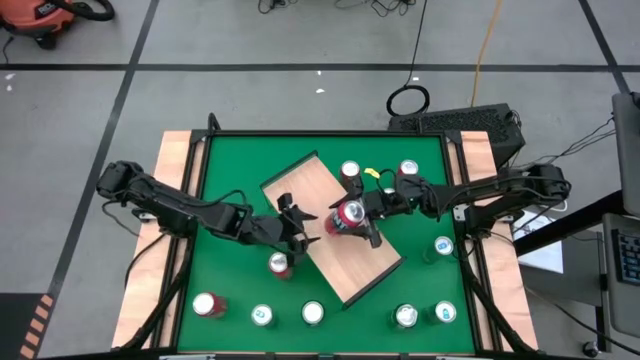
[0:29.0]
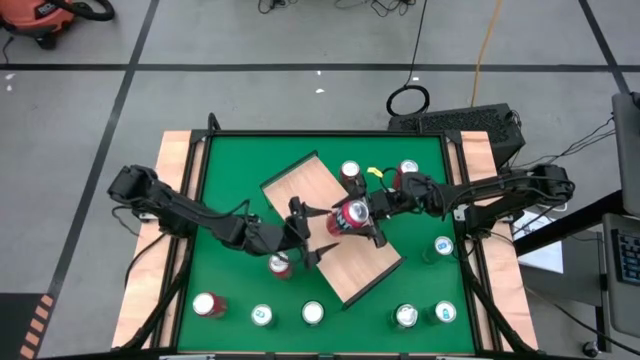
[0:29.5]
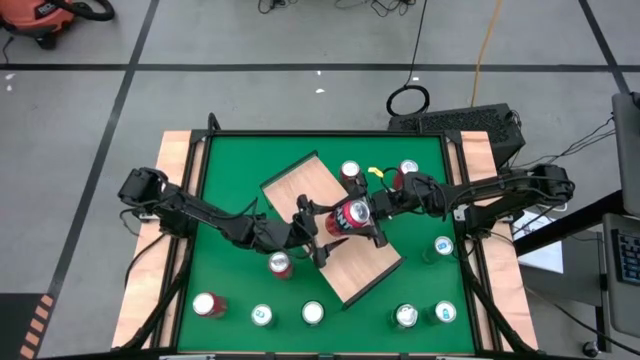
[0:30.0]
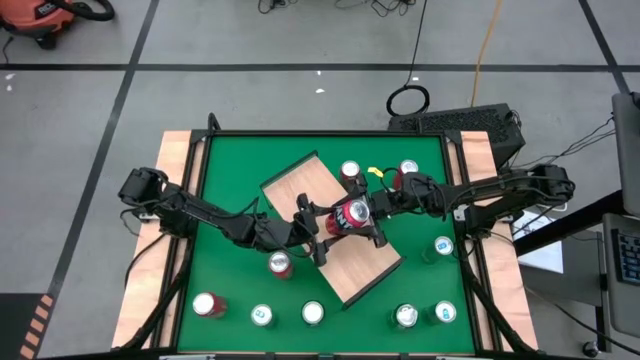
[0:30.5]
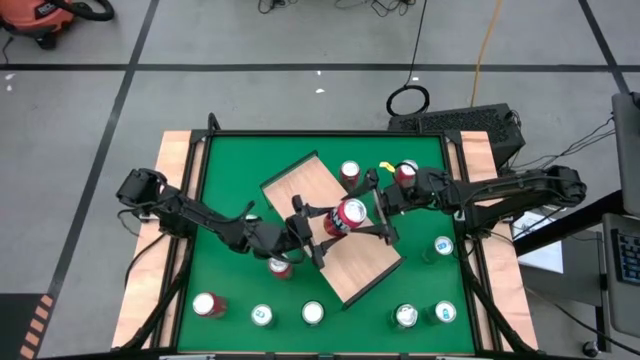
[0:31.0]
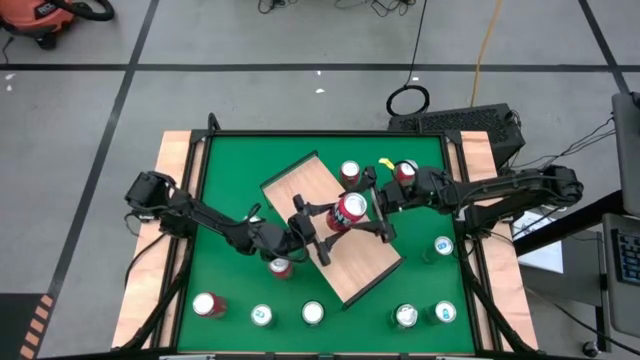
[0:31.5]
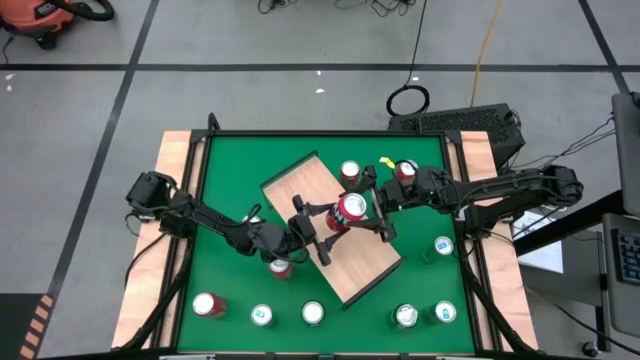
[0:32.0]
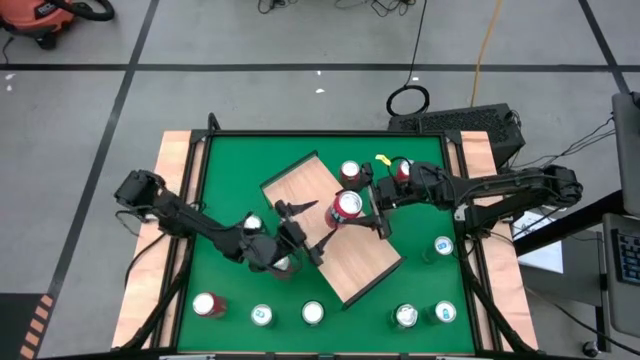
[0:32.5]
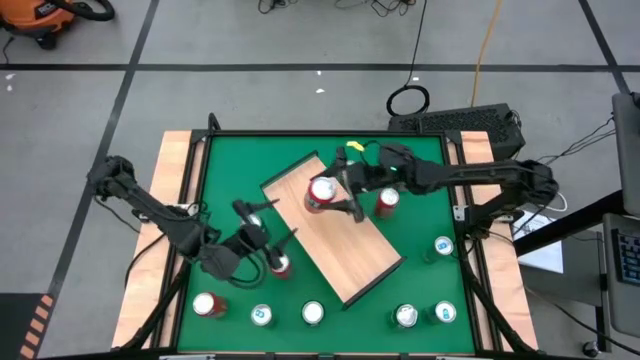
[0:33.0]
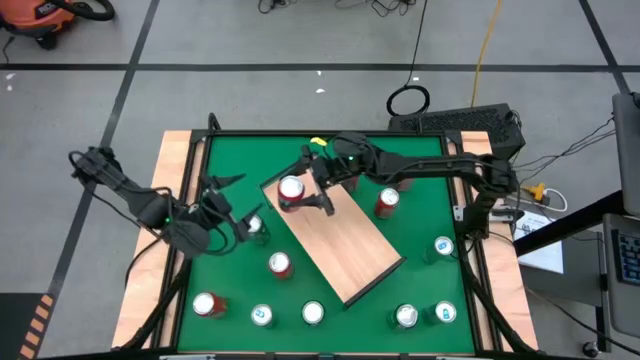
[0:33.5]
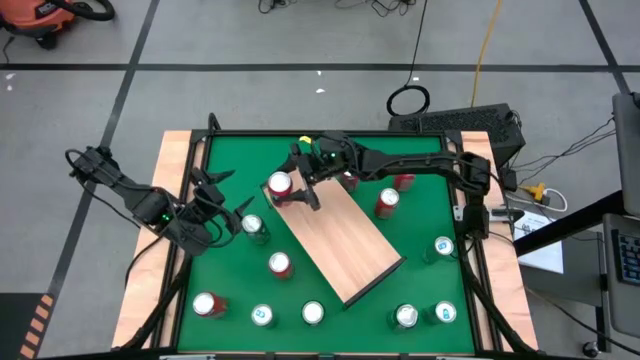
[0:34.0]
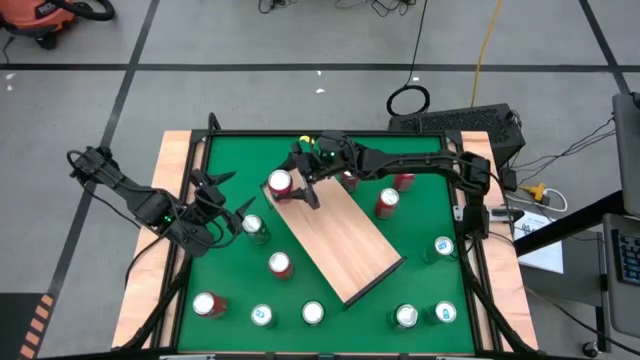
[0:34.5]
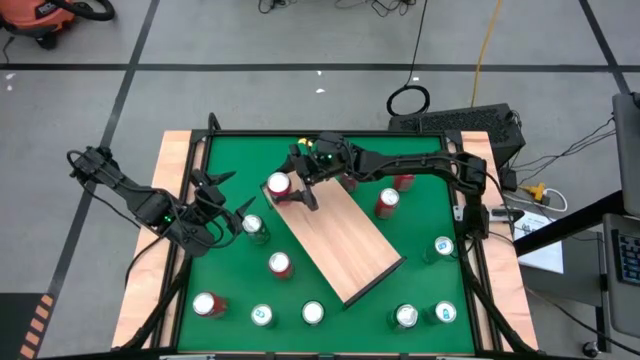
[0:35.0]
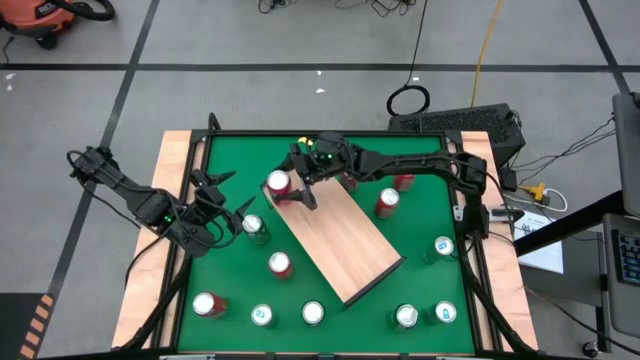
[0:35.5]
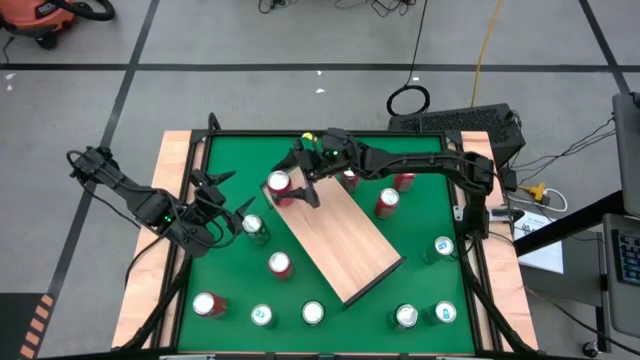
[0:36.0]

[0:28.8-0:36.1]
Task: Place canned beverage on shelf
Put the red soda can on the shelf

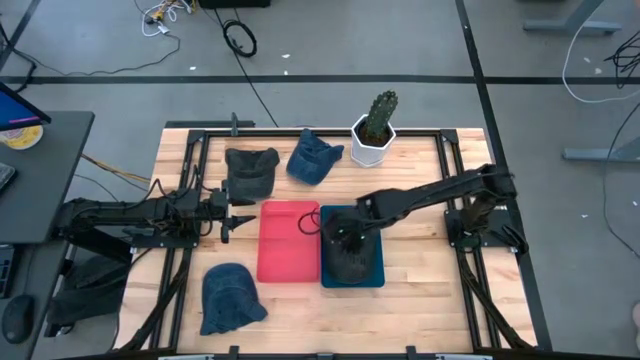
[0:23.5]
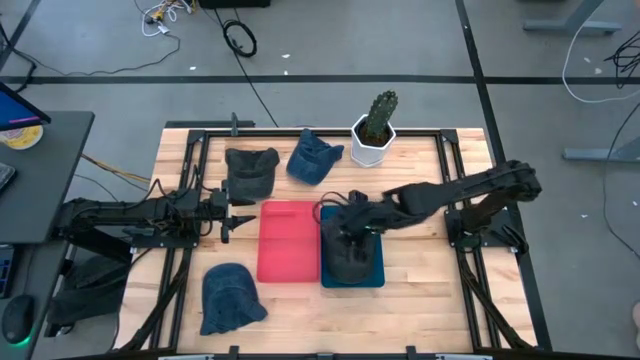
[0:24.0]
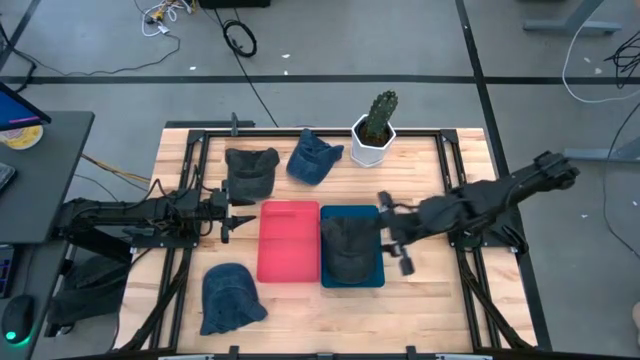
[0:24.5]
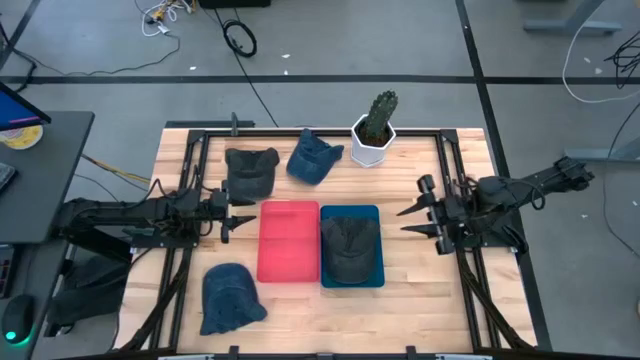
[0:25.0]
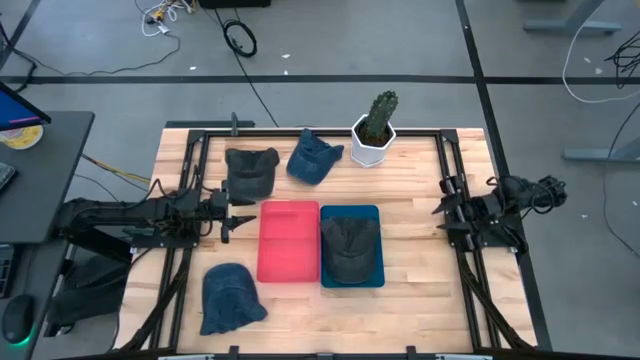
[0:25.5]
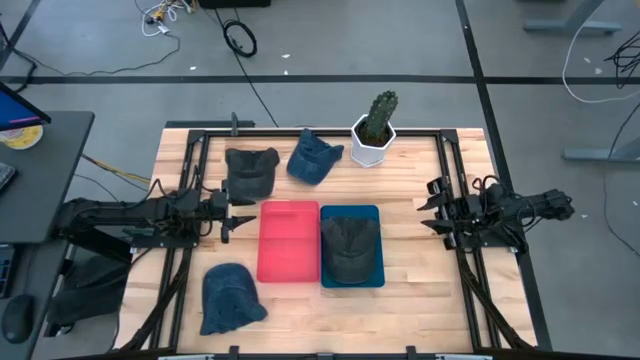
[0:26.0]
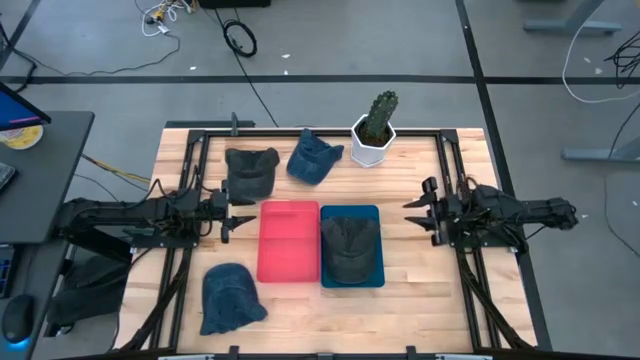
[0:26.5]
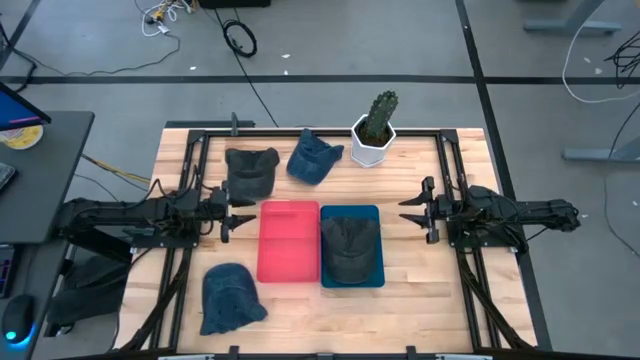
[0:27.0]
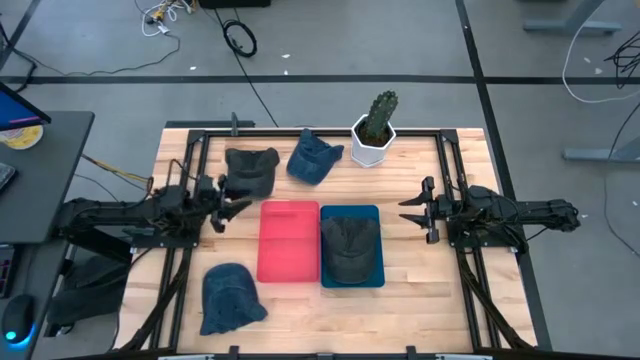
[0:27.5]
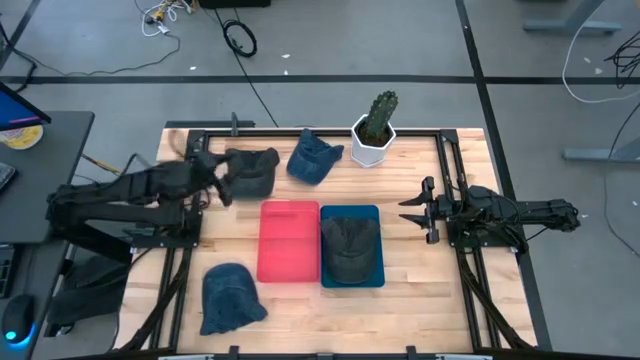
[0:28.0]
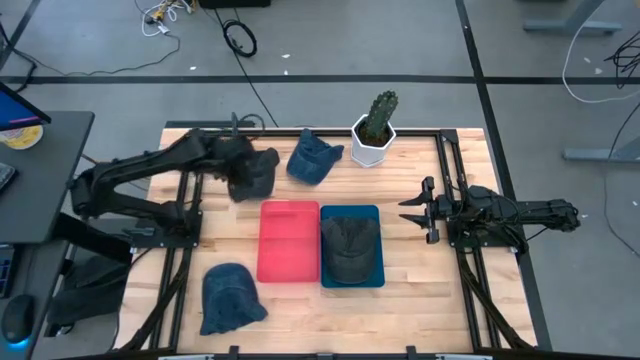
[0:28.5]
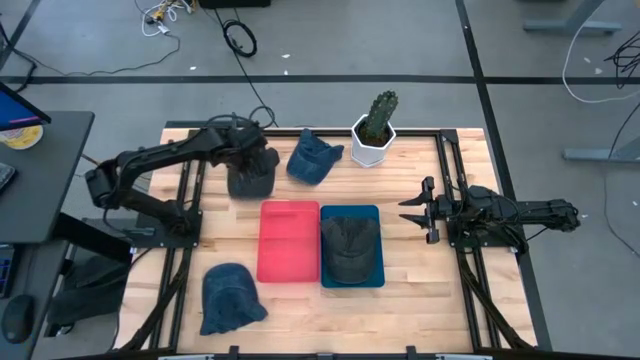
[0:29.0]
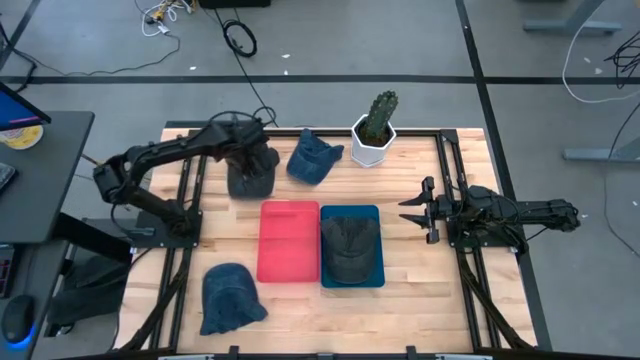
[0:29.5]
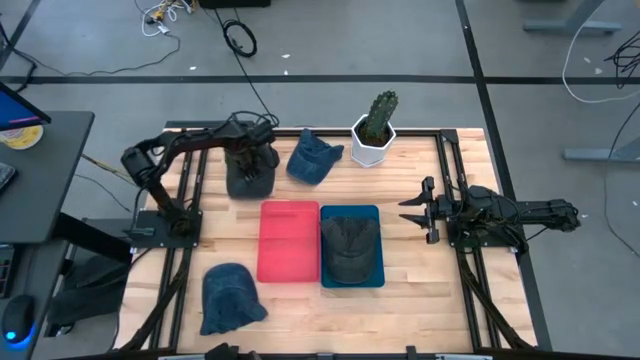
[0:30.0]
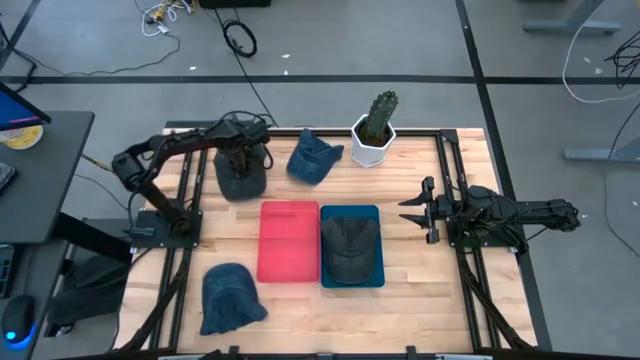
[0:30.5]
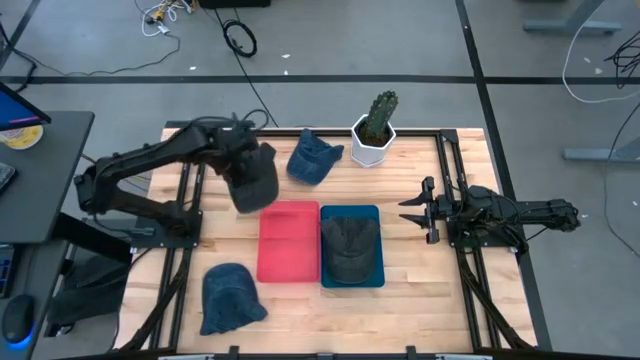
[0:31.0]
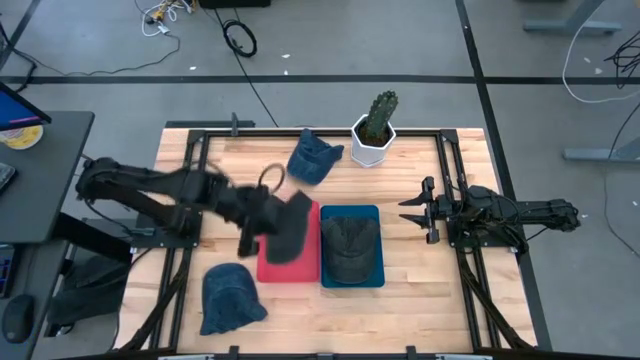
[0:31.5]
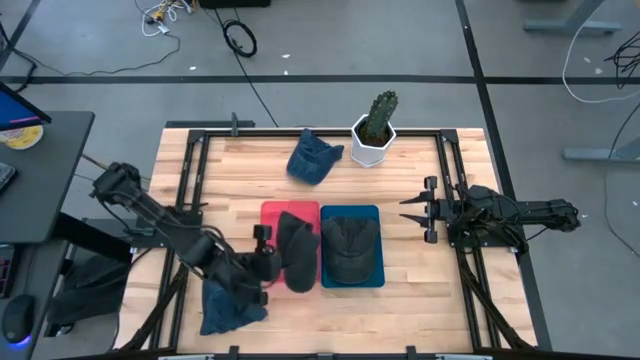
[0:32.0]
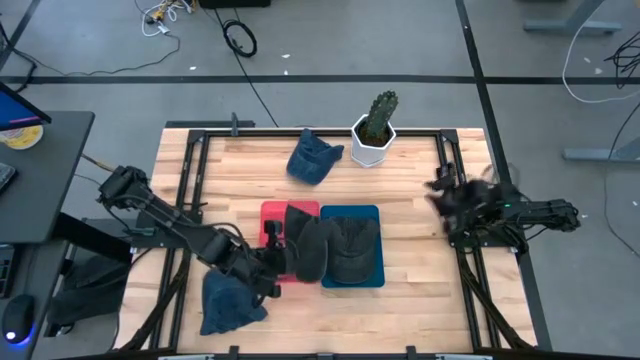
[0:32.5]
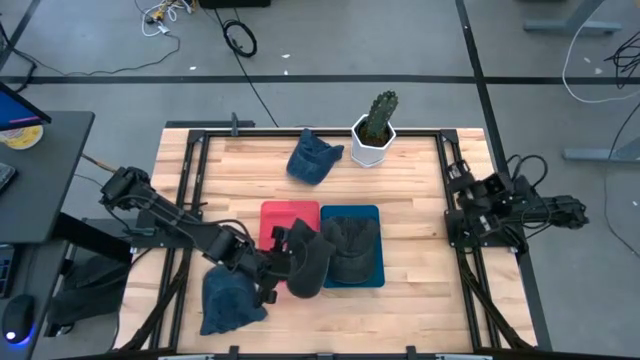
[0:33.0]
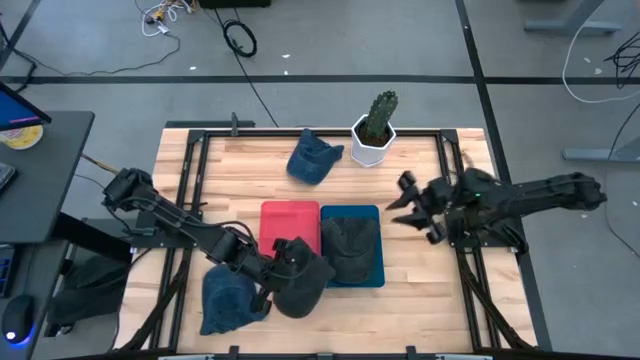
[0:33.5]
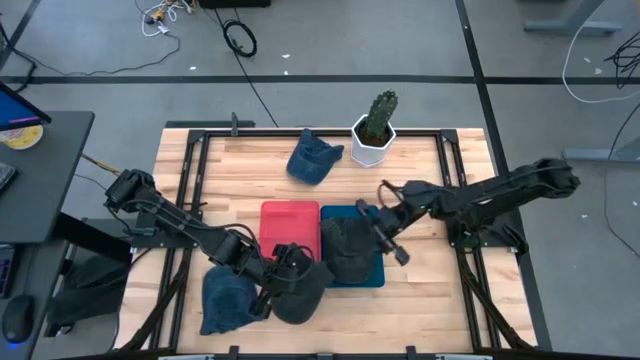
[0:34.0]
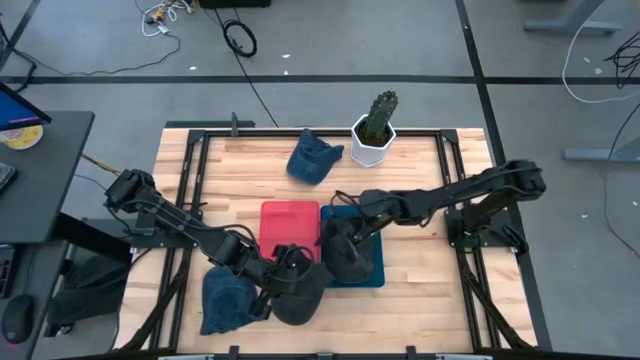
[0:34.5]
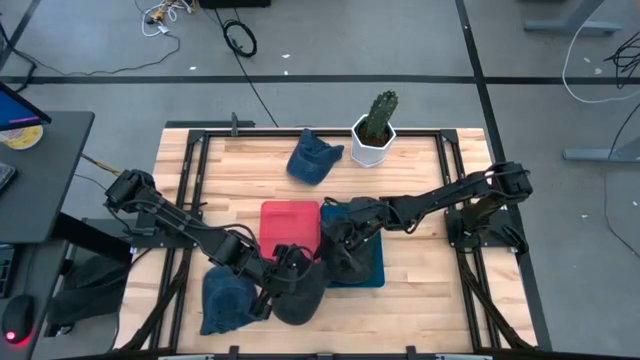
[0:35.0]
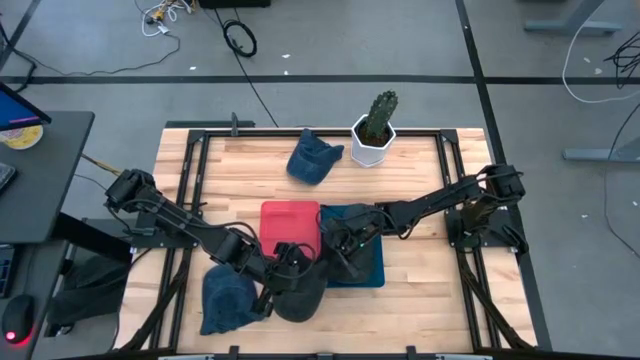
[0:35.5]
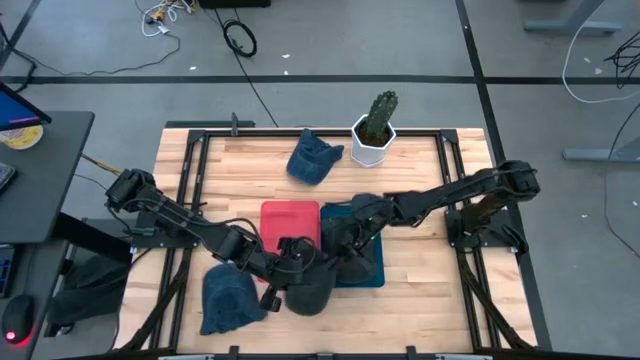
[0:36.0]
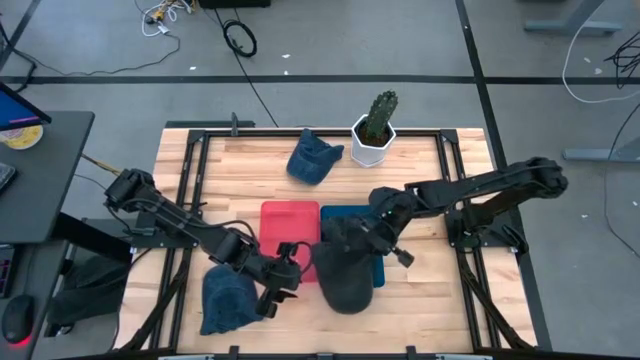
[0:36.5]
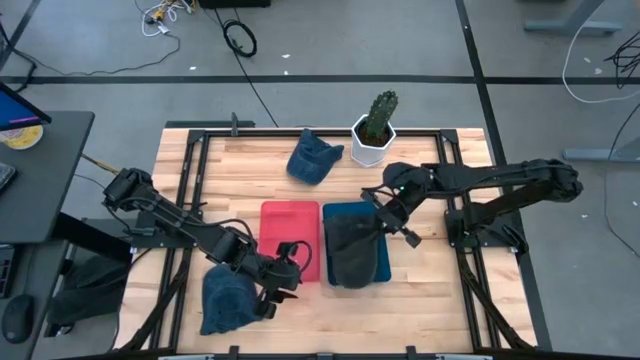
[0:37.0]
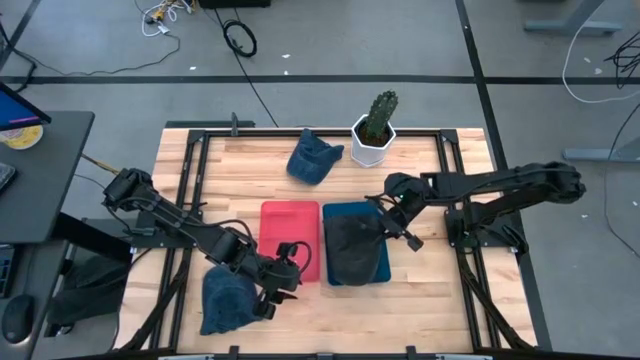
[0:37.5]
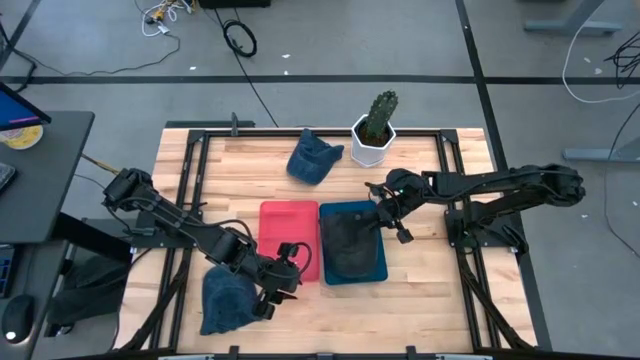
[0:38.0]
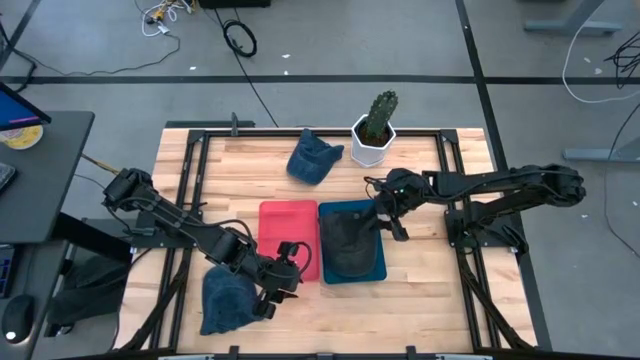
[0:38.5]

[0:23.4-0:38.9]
Task: Pick & Place hat
Put the black cap into the blue bin
